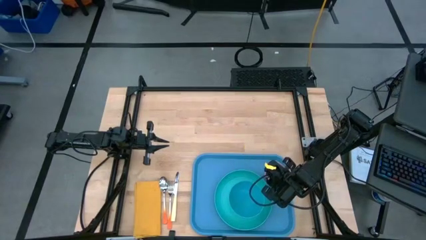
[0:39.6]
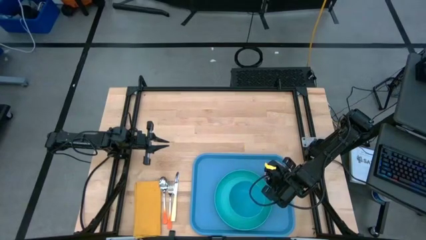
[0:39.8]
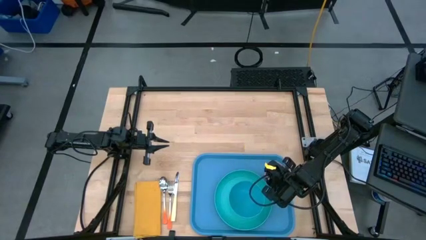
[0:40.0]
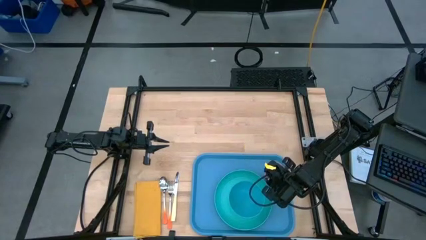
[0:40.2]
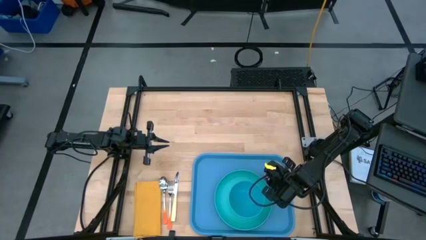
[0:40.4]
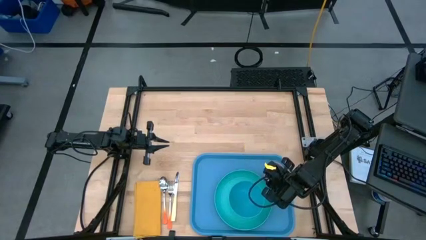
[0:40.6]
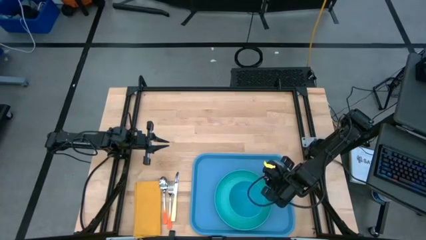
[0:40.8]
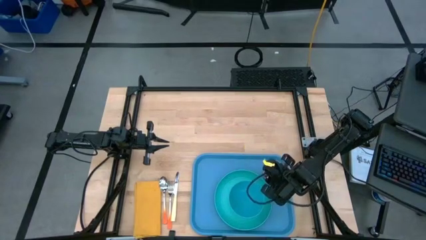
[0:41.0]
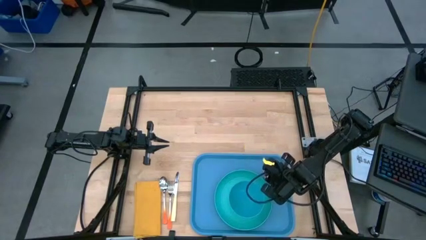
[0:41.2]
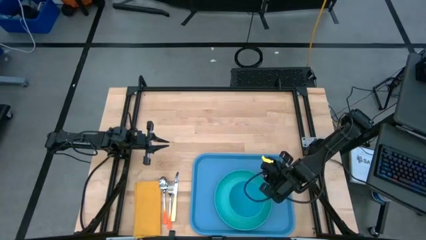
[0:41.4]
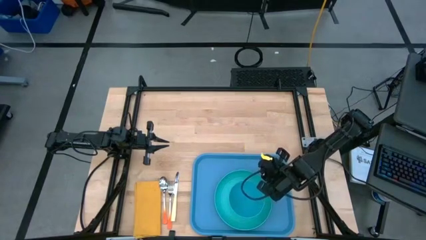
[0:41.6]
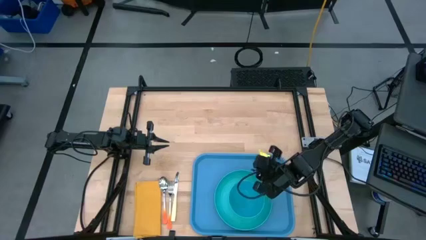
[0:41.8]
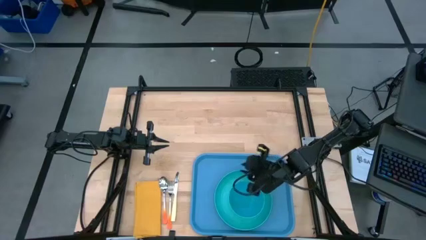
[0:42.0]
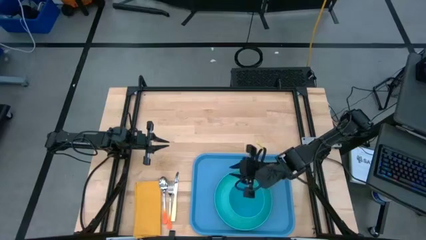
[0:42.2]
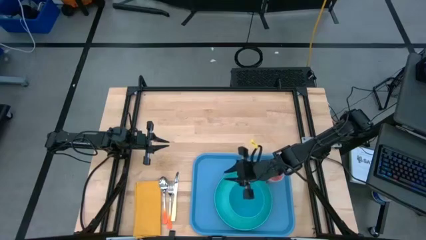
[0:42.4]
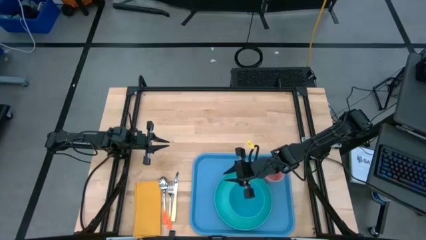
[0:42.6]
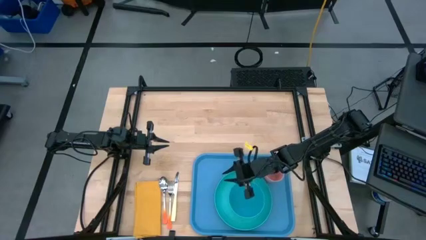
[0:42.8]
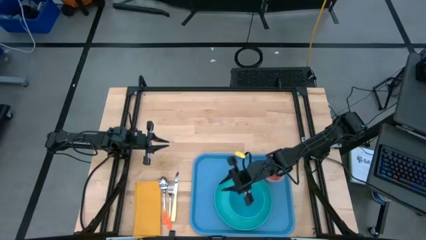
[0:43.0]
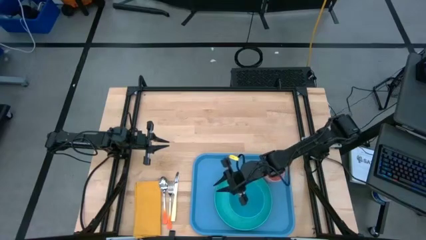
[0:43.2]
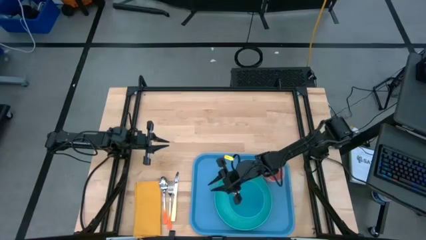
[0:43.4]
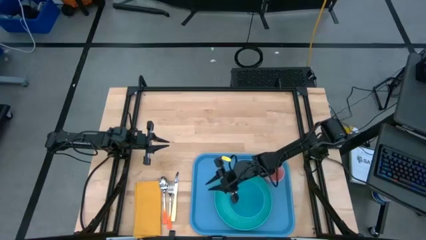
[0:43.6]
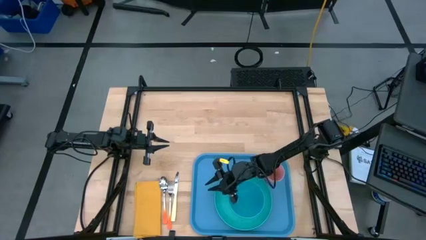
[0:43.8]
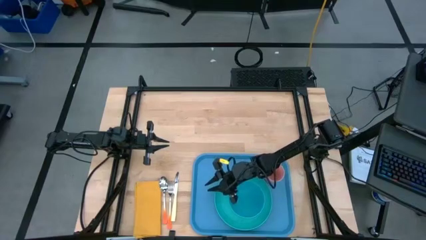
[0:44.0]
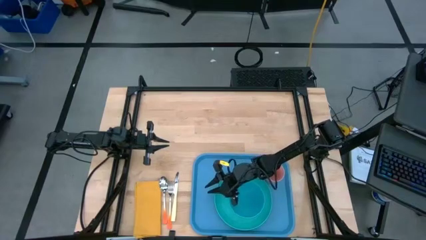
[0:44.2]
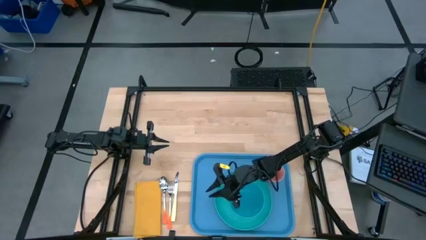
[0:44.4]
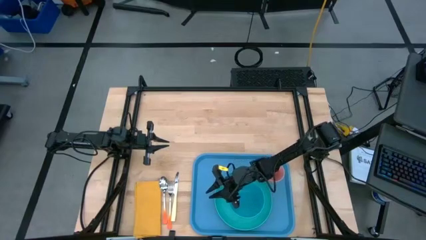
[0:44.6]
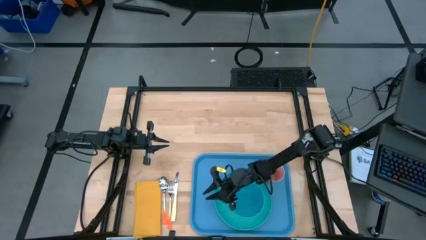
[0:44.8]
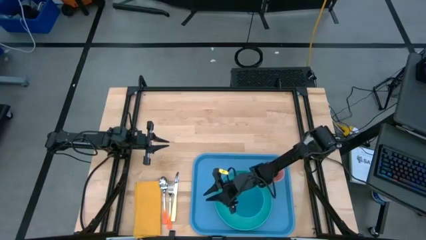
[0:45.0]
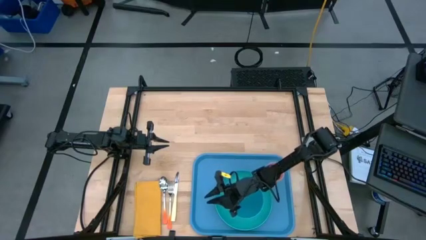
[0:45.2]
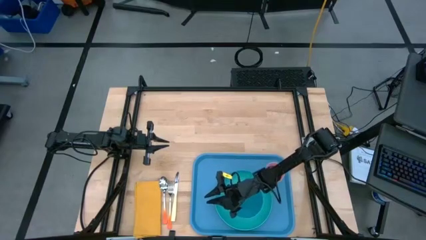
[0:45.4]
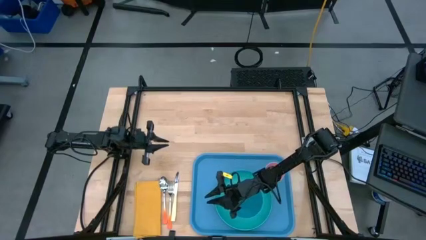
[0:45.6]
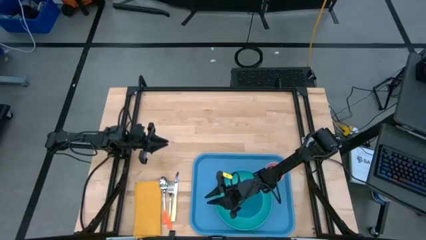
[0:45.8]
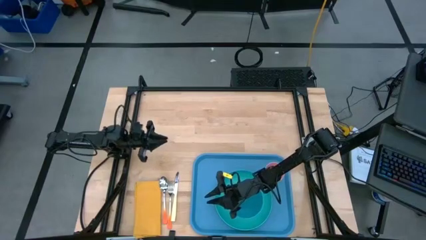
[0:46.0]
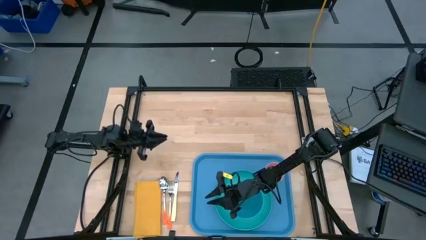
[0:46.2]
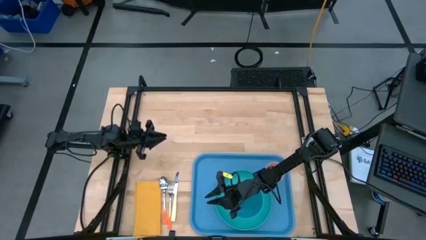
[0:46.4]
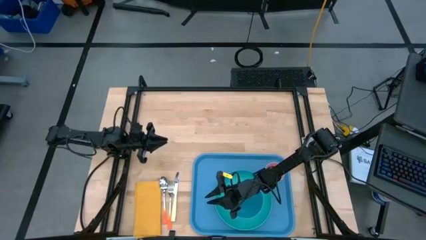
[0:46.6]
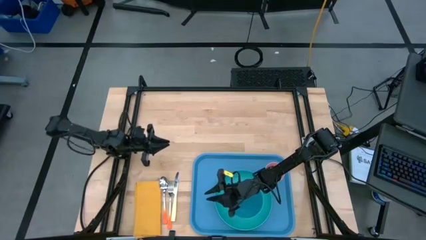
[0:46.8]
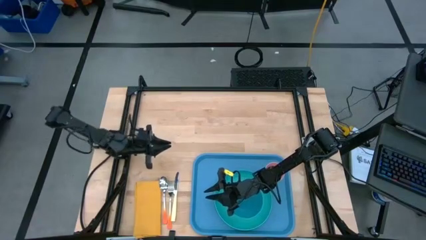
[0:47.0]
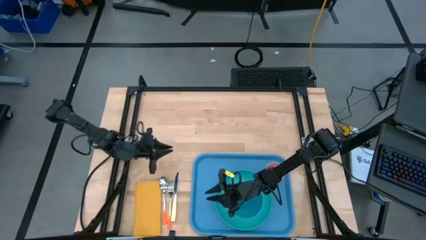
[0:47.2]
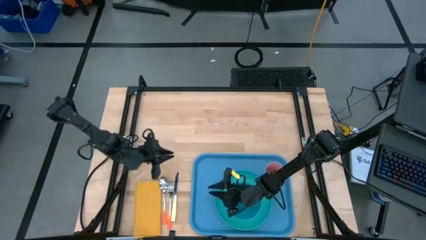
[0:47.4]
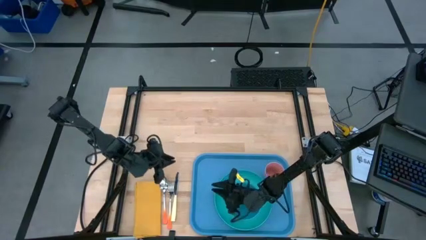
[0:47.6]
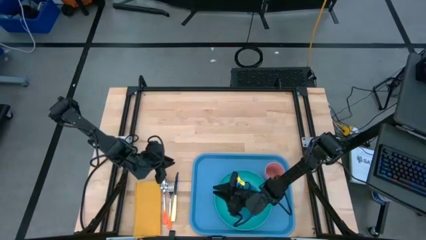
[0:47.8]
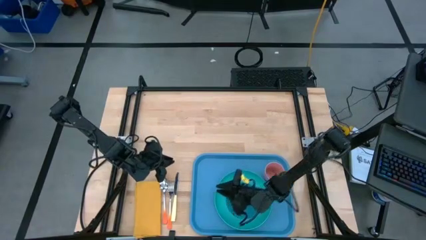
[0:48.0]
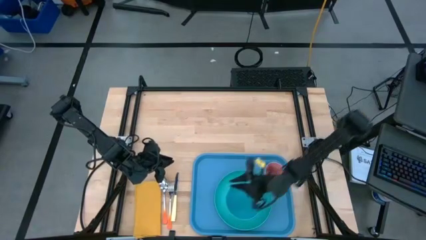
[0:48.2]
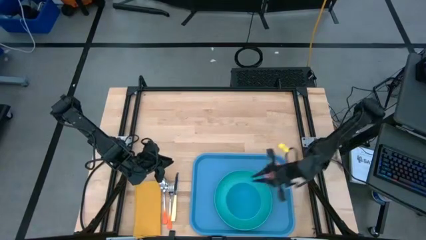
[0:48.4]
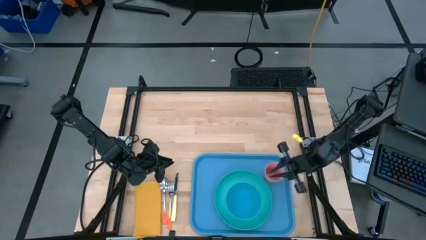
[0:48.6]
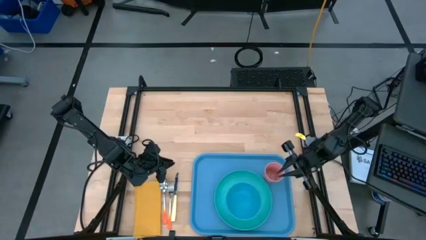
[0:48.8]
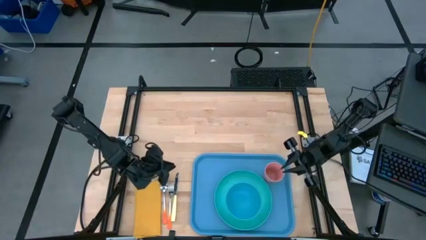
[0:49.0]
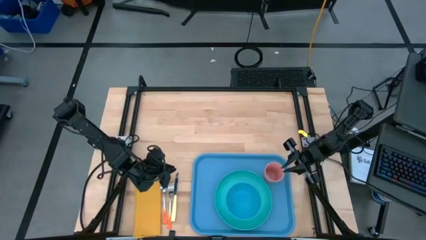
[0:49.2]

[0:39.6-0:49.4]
Task: Set up tray
Put the yellow napkin on the blue serving tray to the left of the light blue plate
